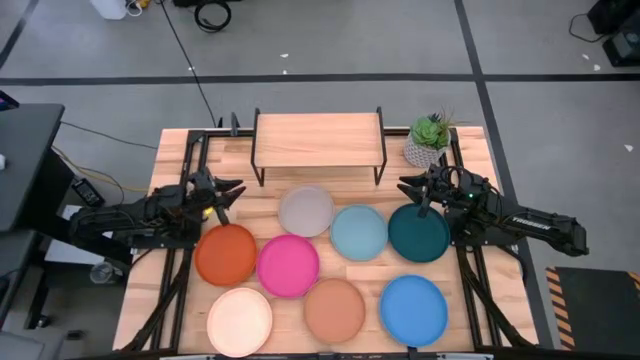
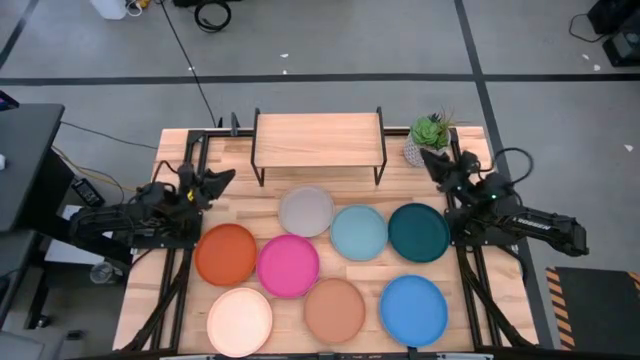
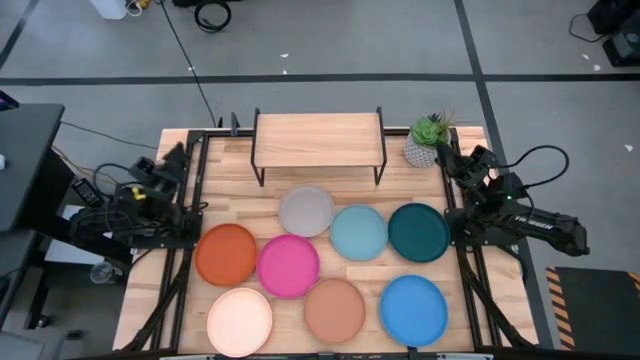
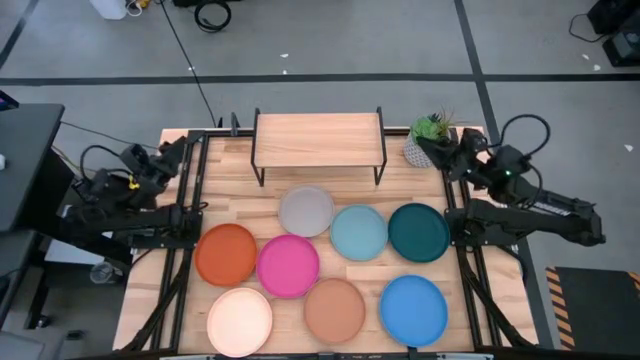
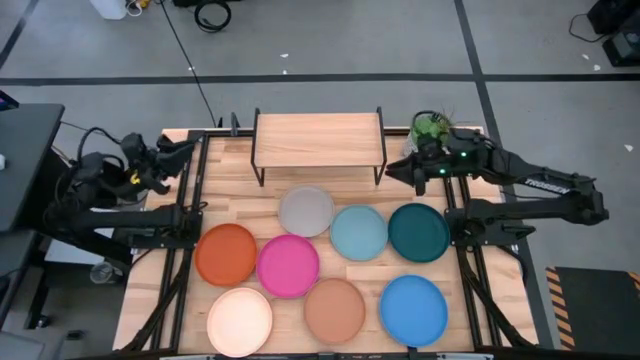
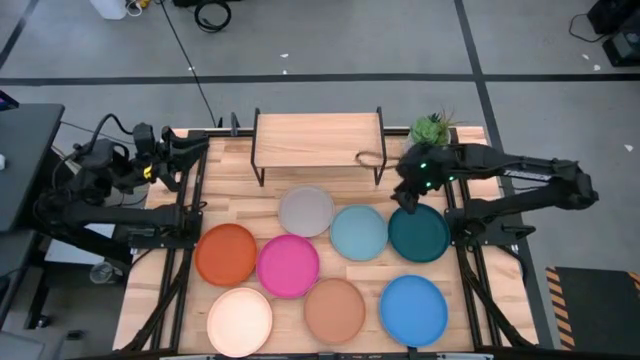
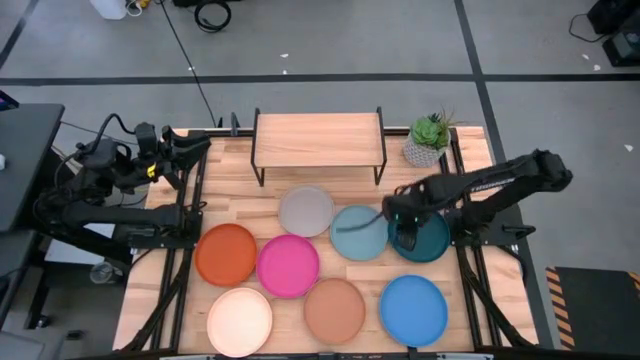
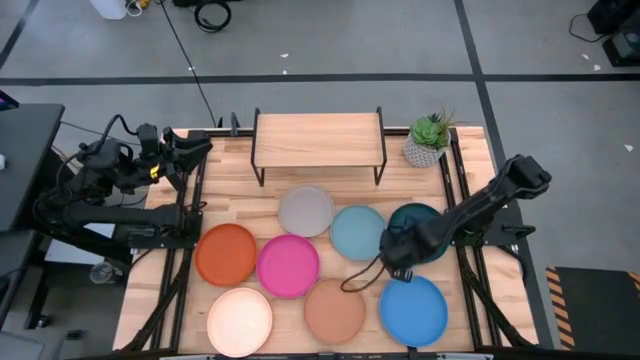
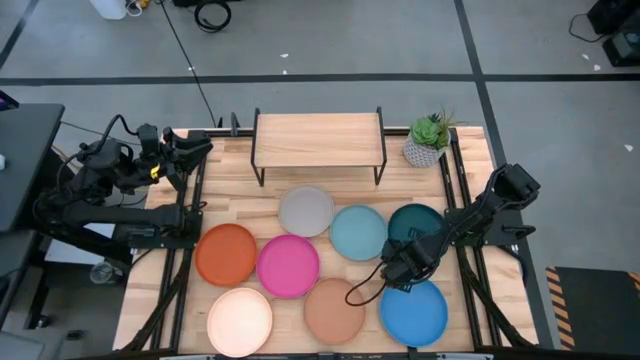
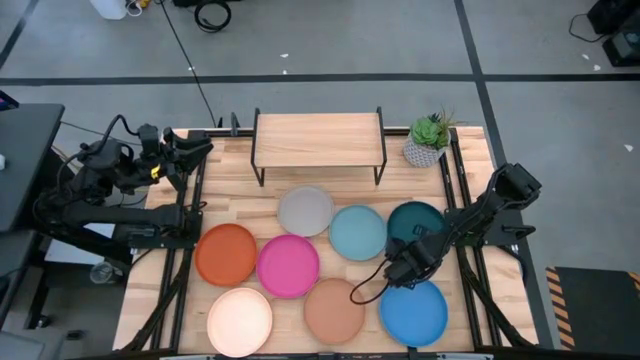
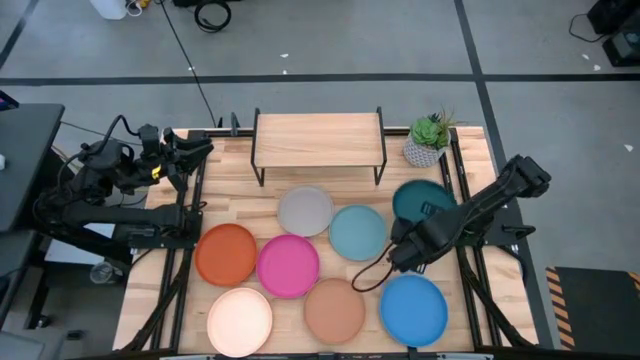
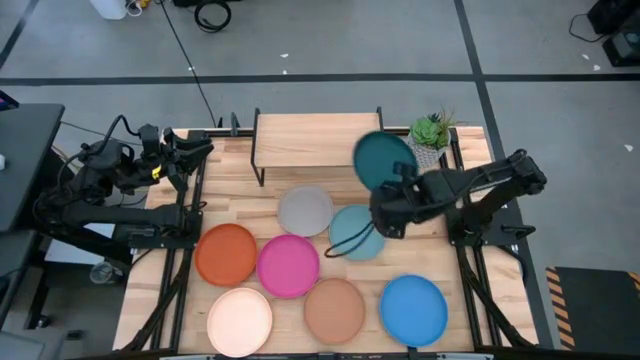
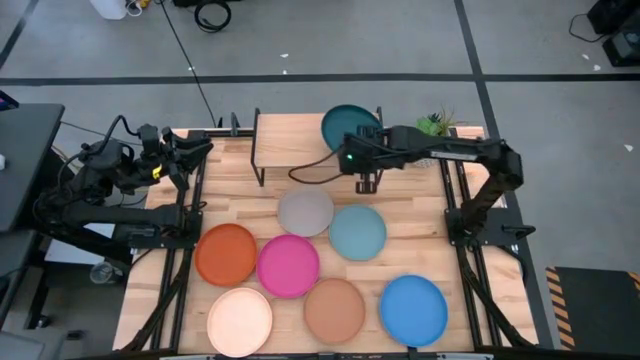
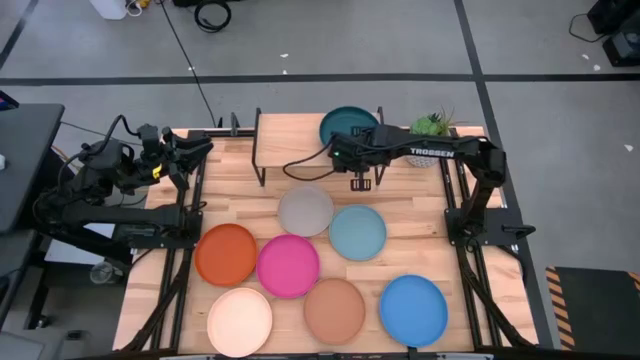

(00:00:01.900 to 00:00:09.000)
Task: Place and stack plates onto a shelf
Put the green plate on the shelf

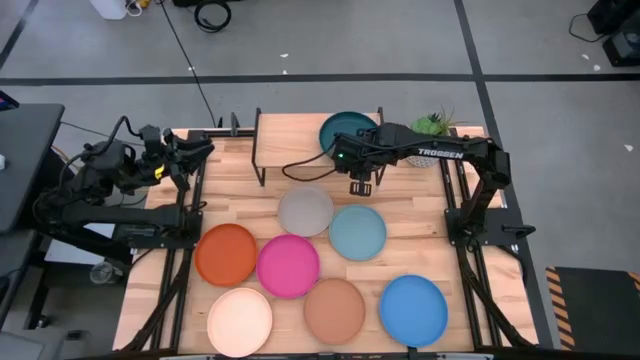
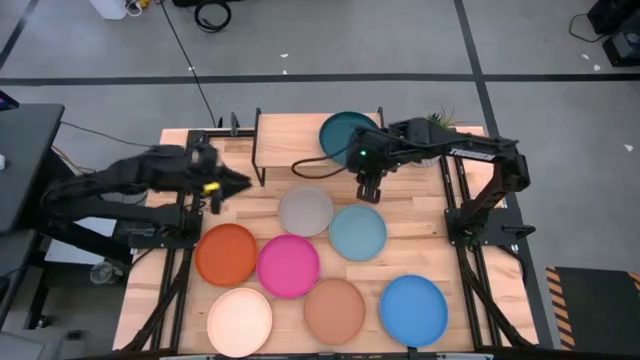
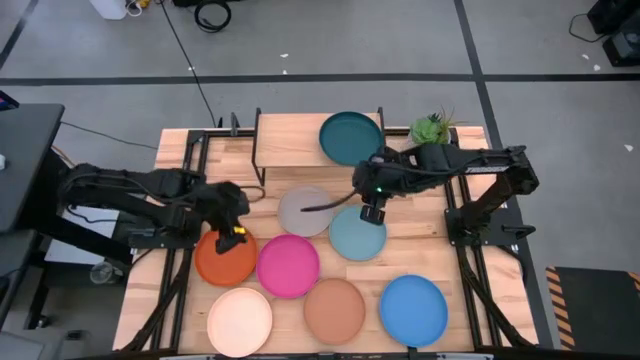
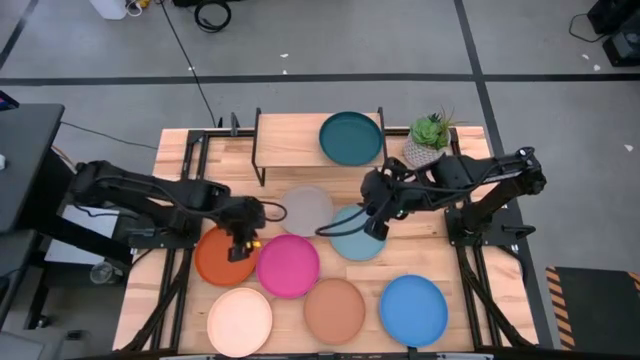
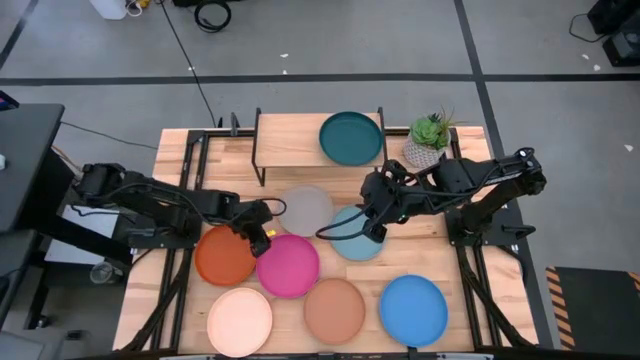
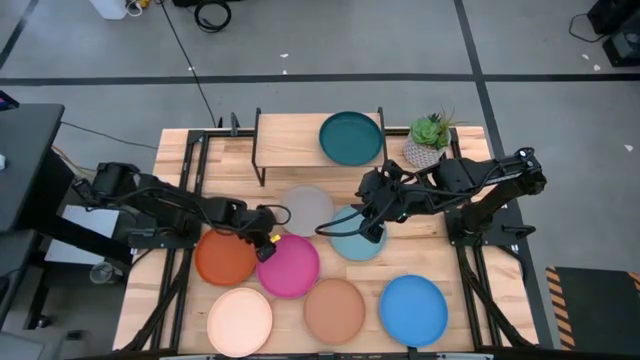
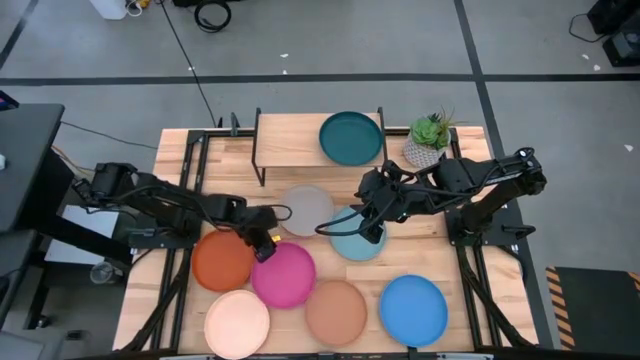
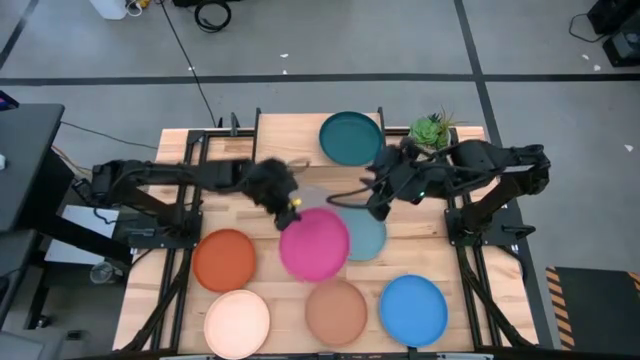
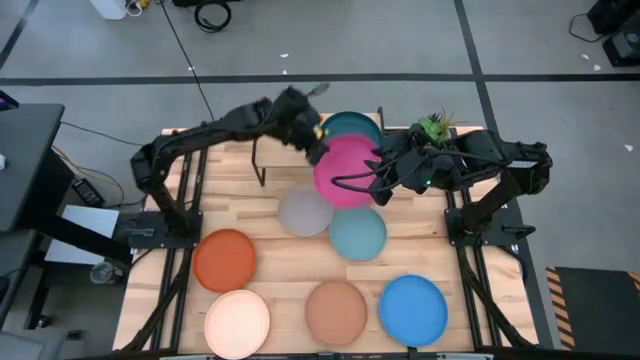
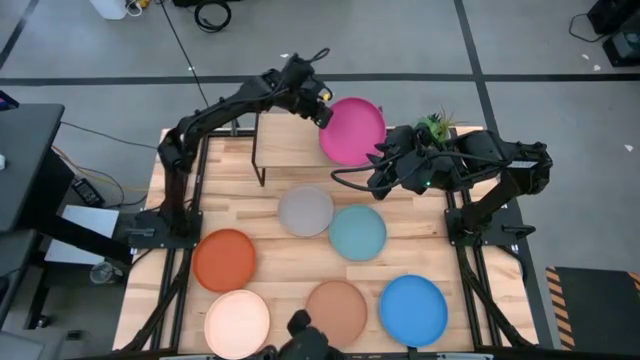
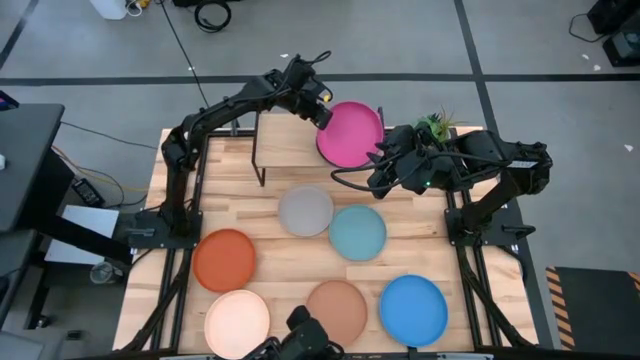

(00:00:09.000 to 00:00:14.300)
Stack the pink plate on top of the green plate on the shelf

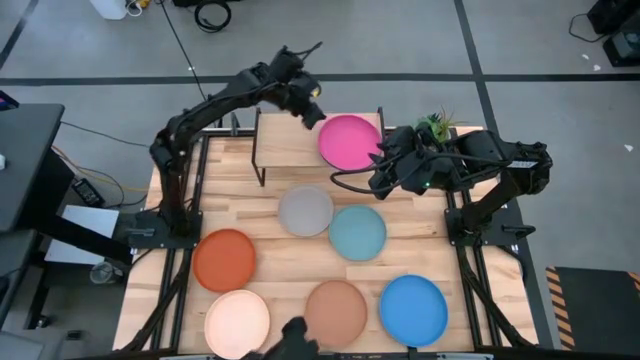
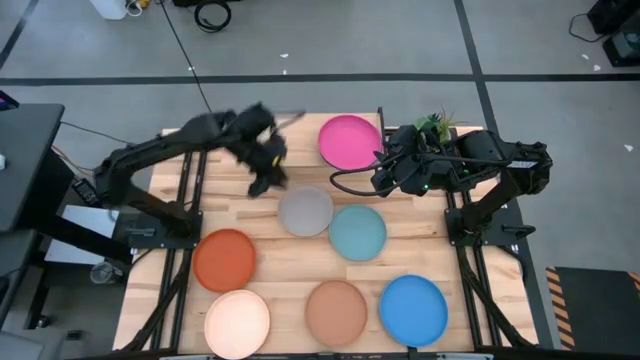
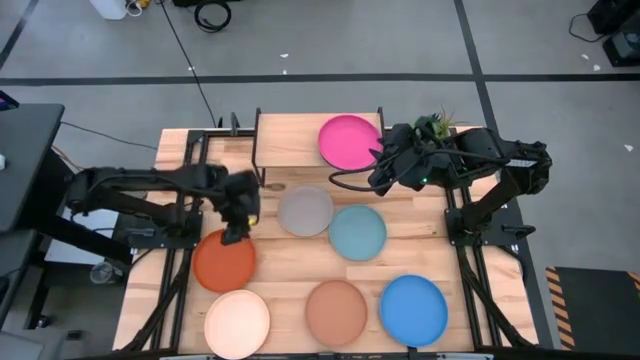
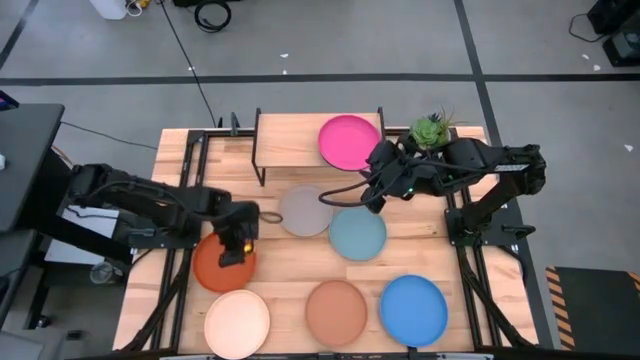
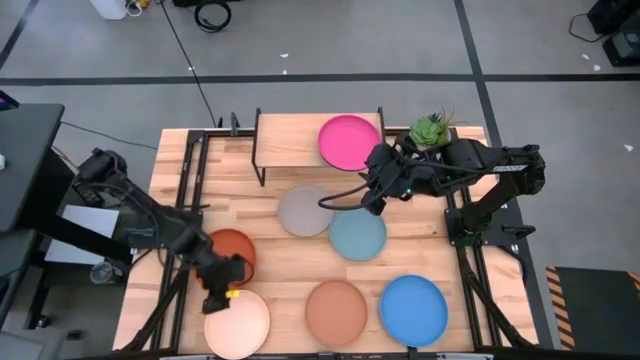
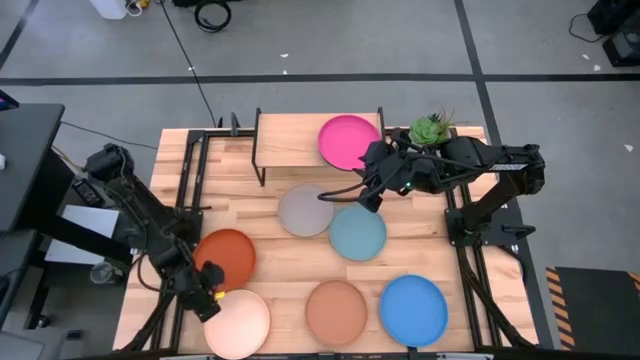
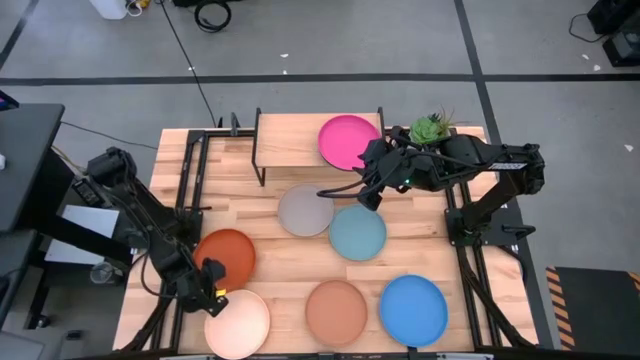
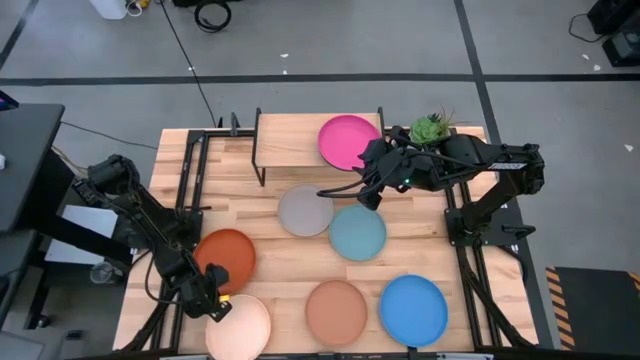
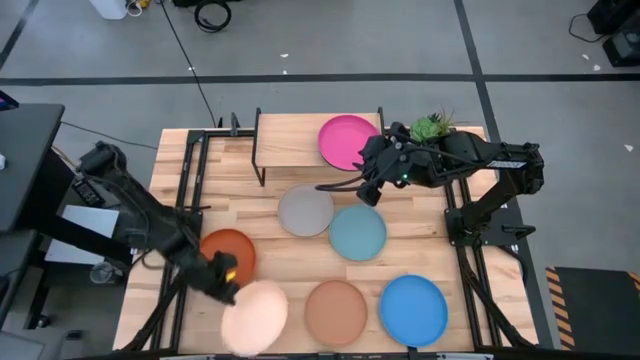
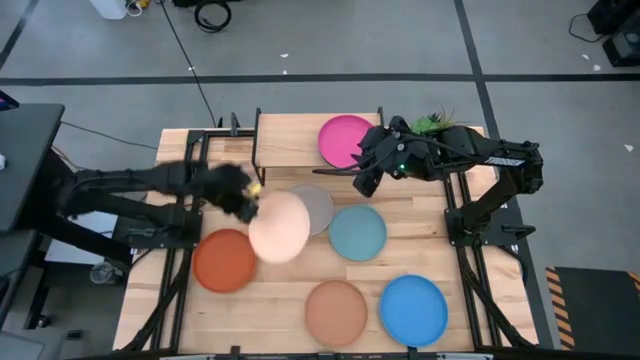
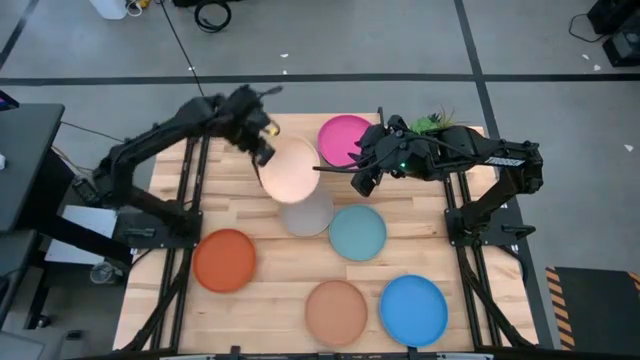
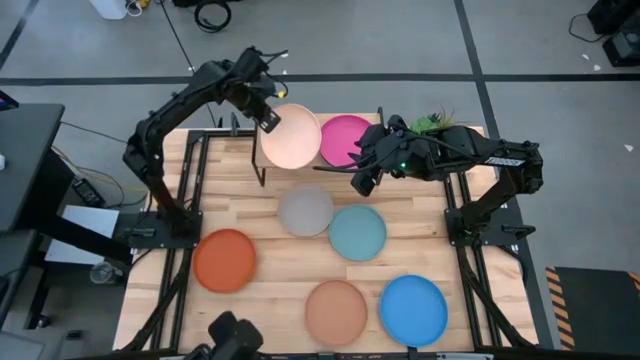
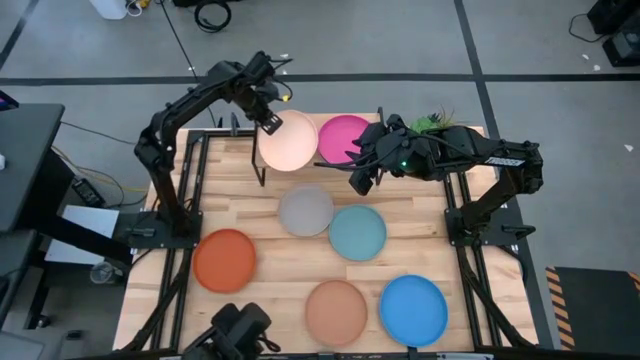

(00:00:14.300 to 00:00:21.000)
Put the white plate on the shelf

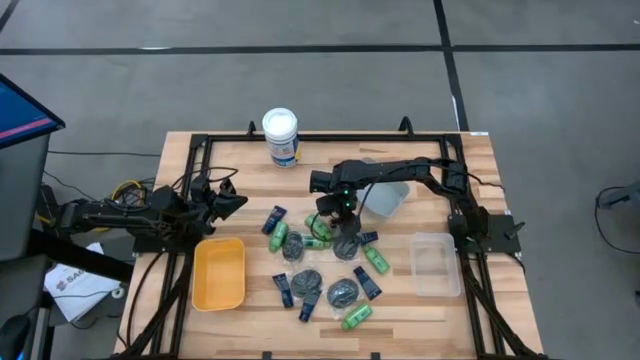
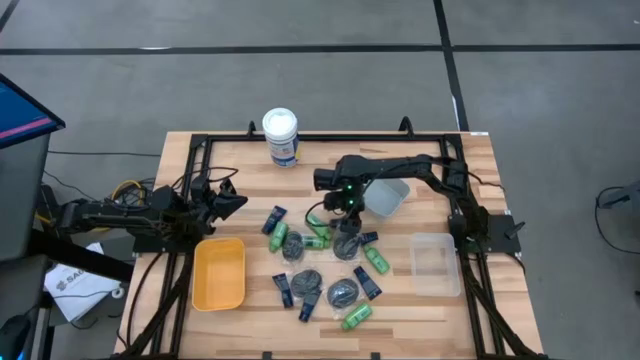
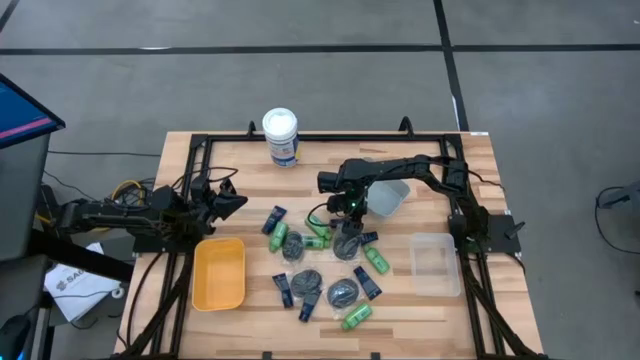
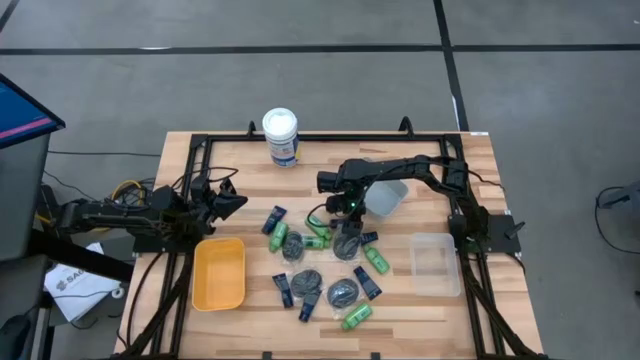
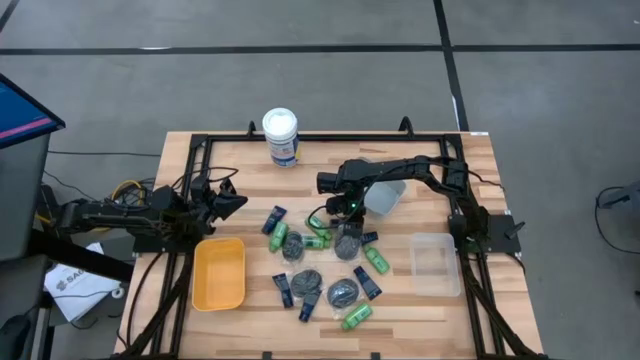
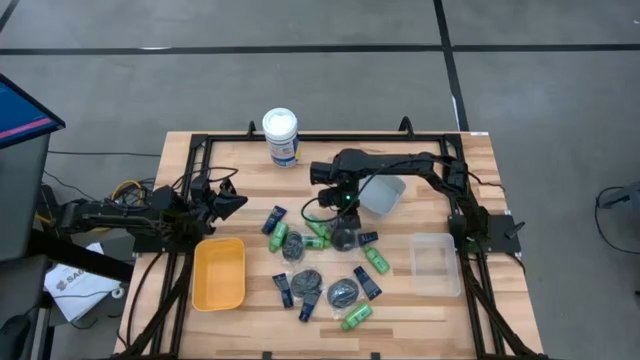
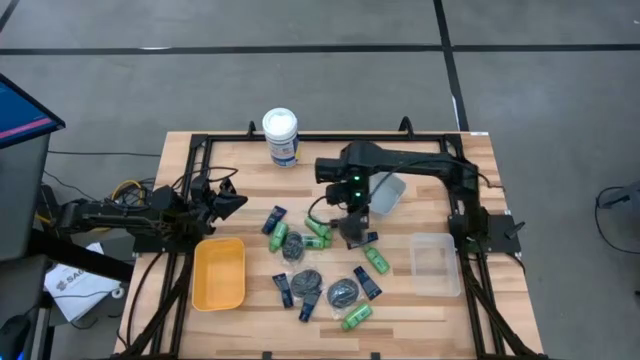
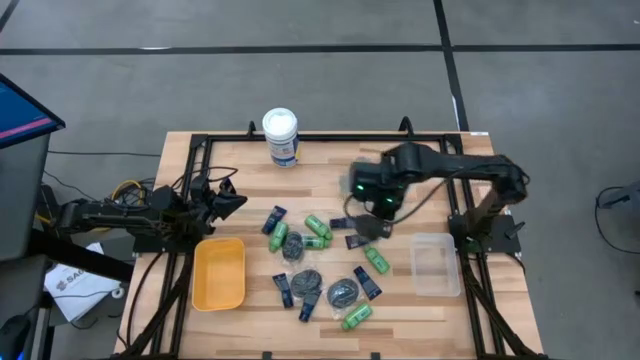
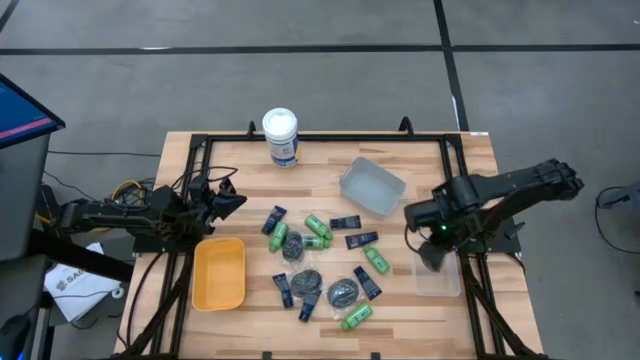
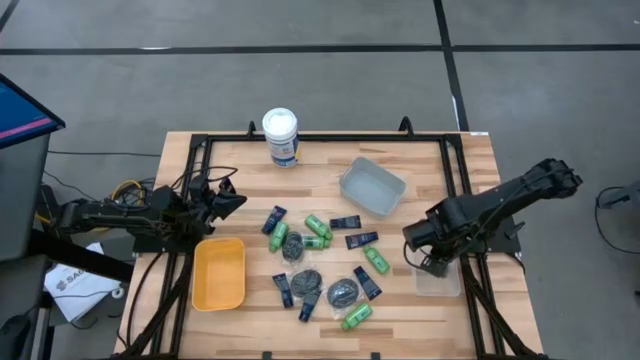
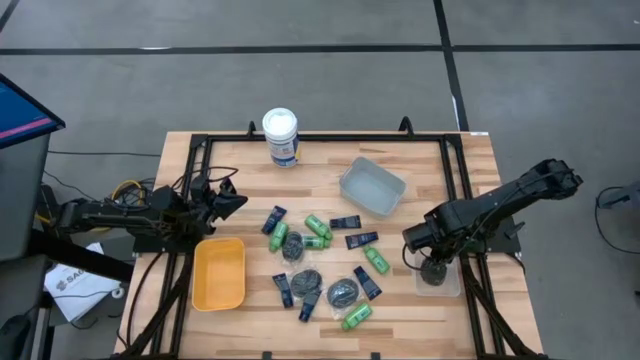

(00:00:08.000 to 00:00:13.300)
Task: Pick & Place Travel size toiletries
Put the black hairbrush into the transparent bin
